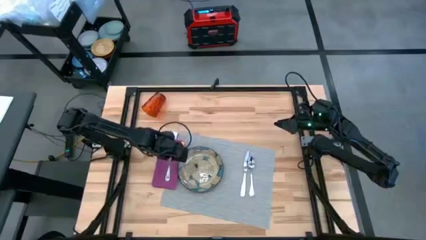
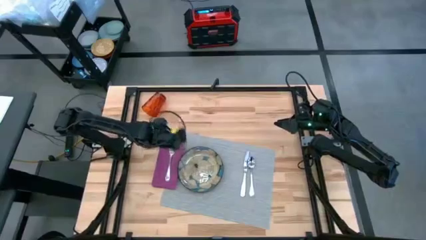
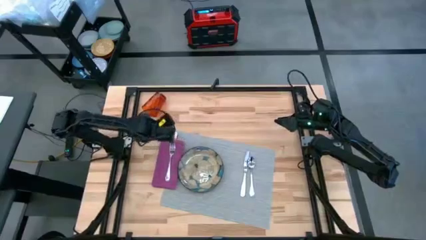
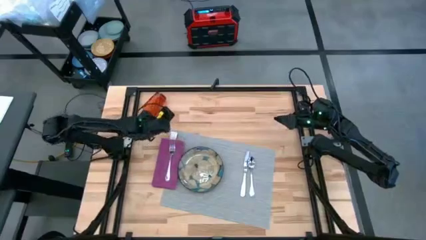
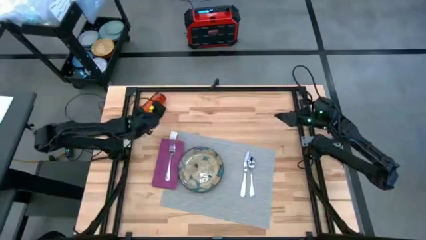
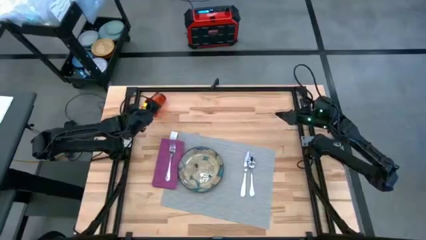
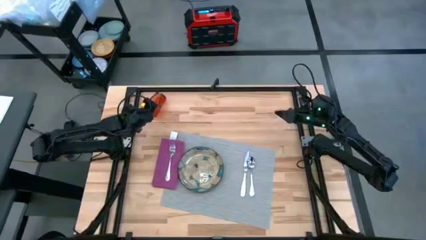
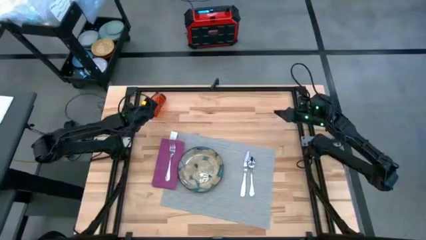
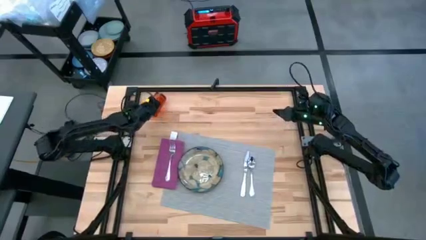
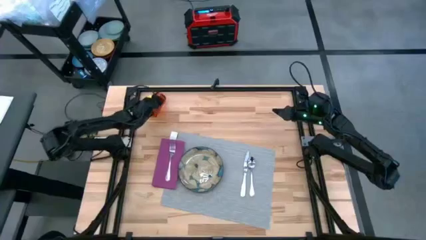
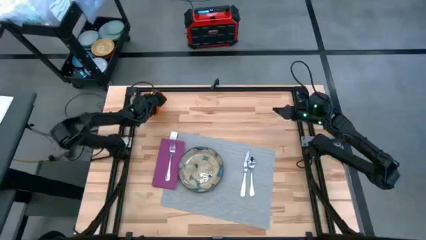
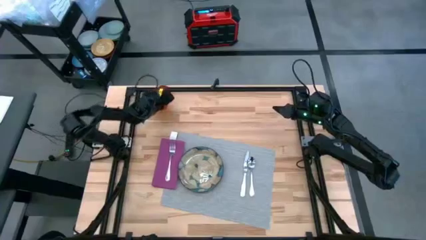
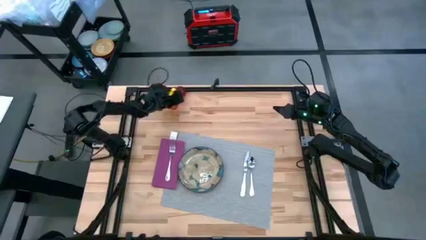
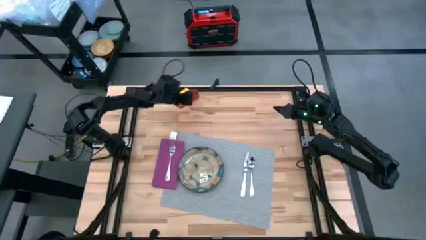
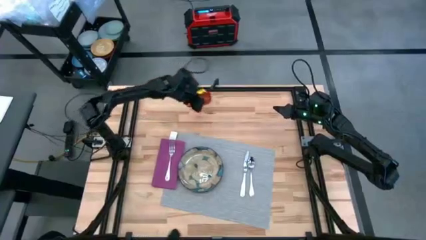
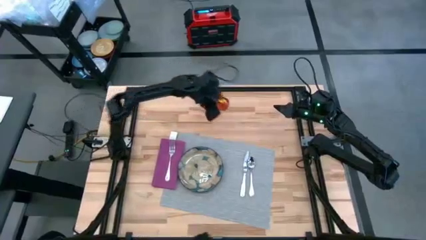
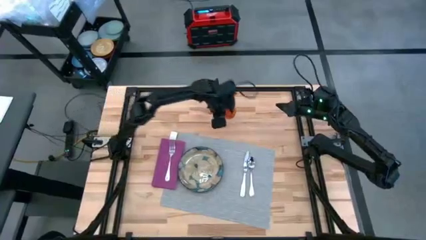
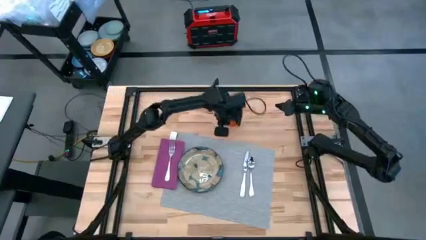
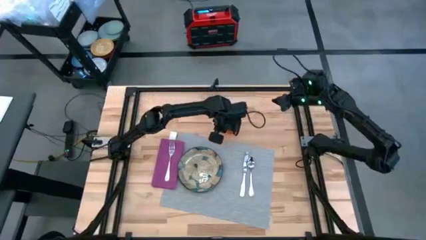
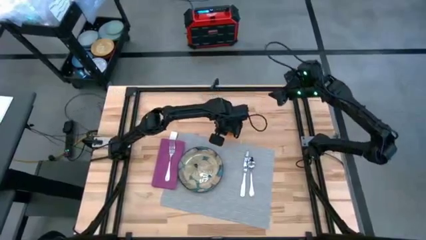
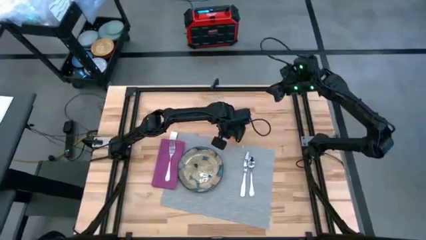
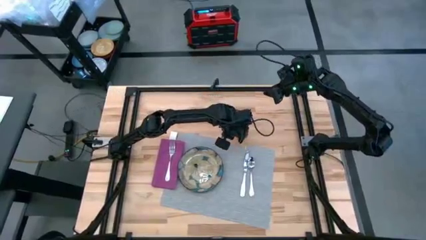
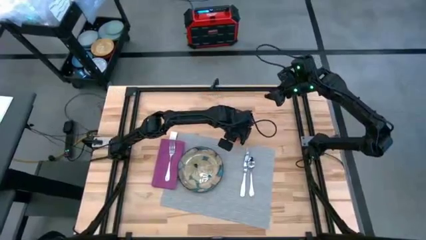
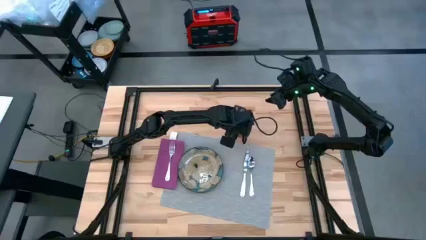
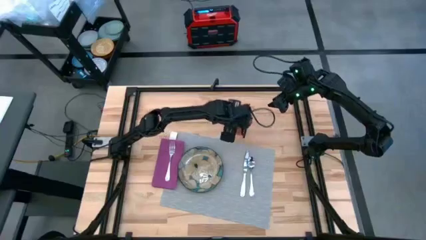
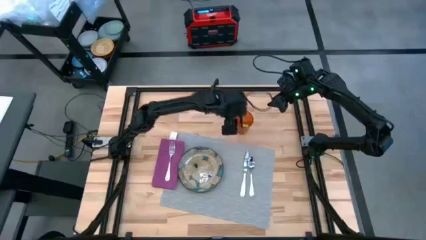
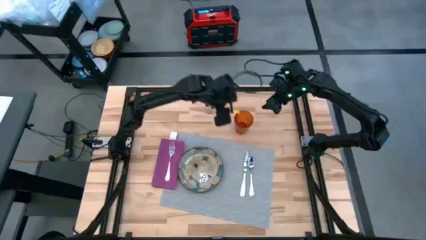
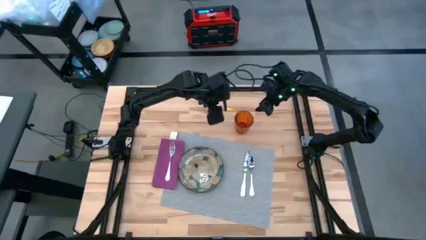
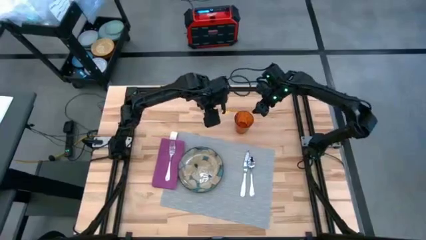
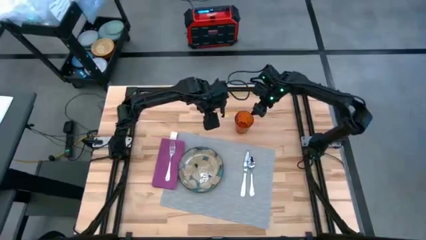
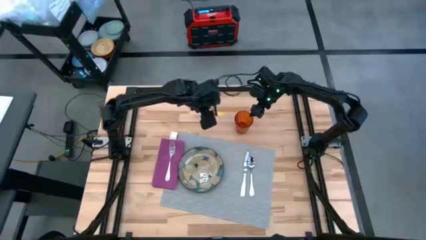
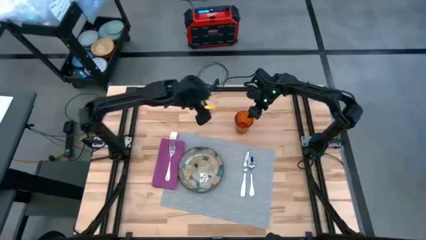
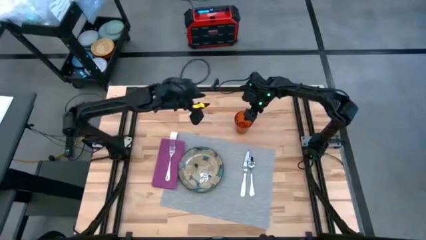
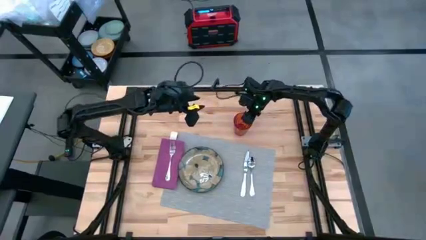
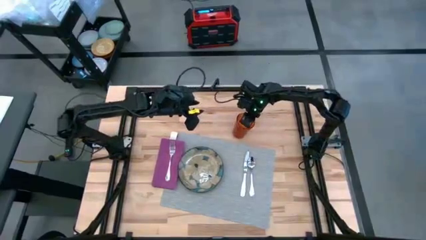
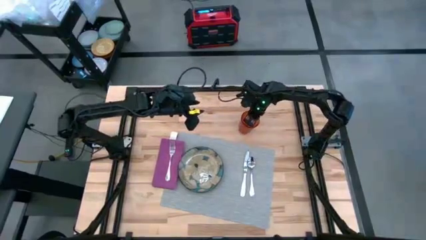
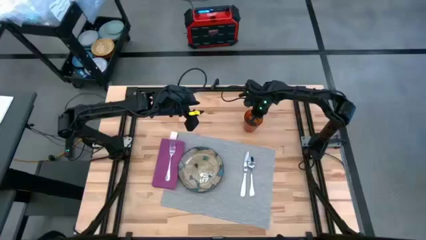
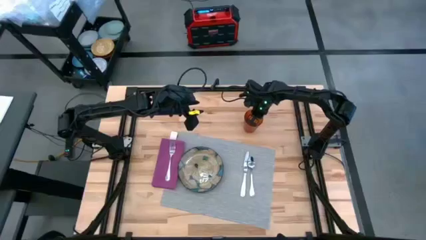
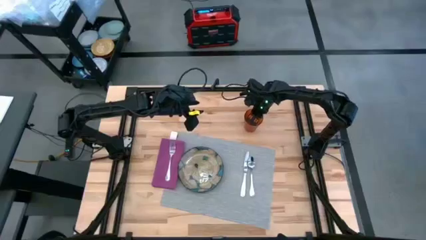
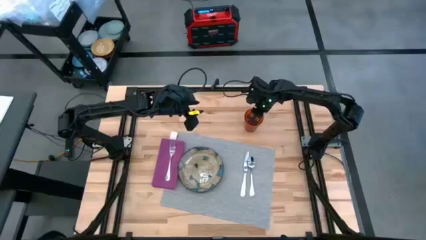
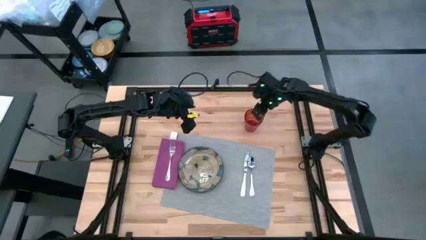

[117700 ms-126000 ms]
Task: Set table place
Put the orange cup to the top right of the gray table placemat

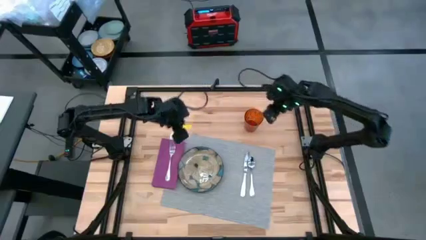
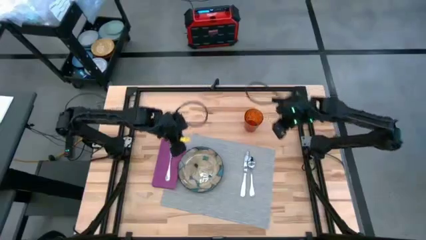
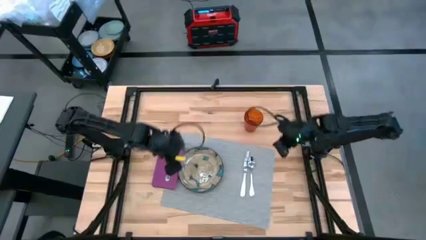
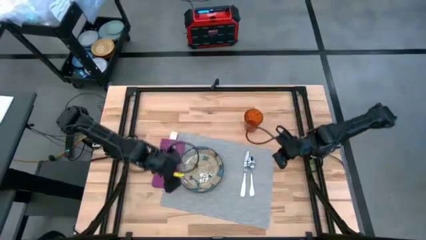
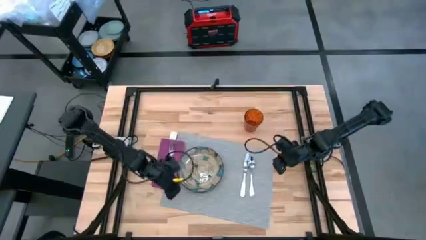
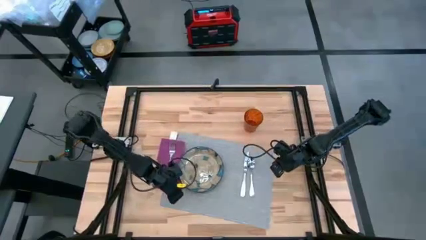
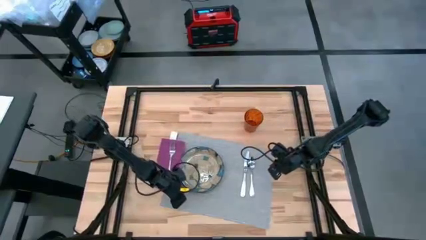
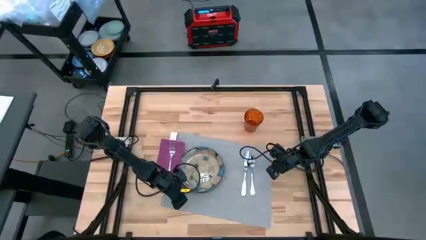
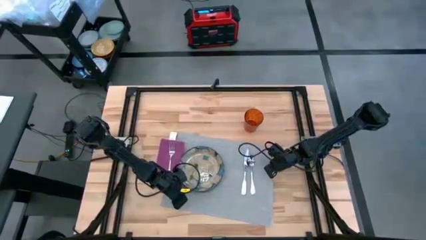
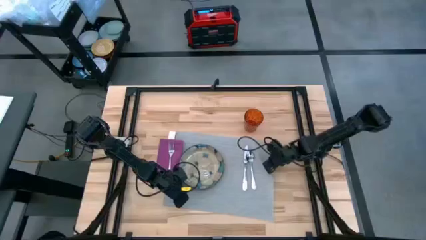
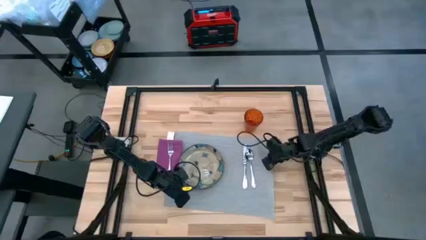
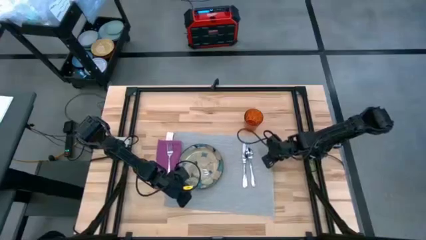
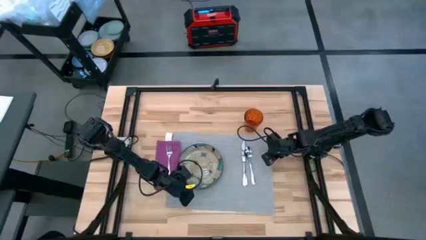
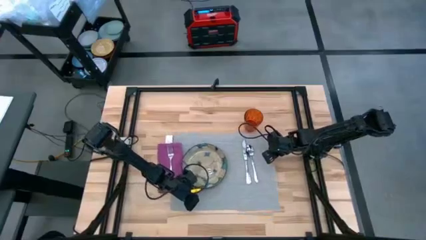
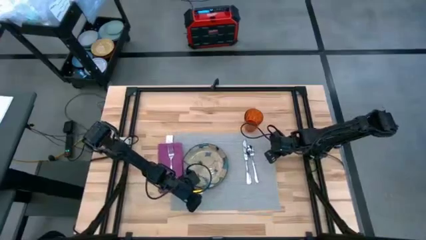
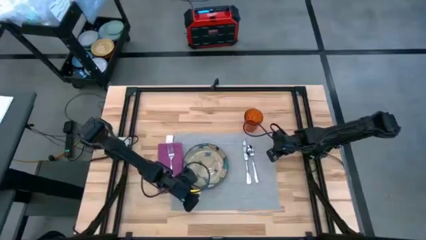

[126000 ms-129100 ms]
Adjust the gray table mat

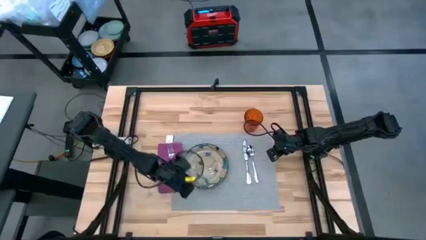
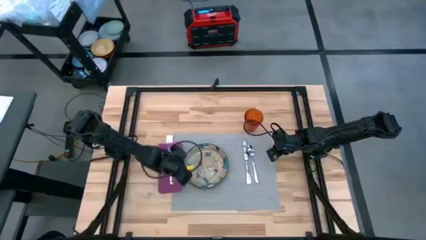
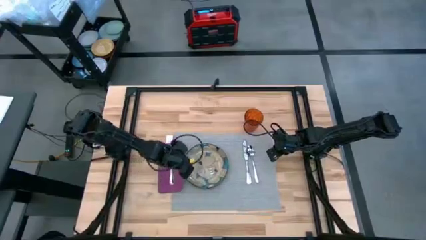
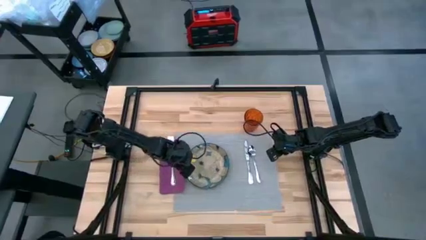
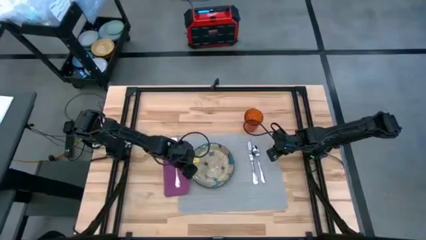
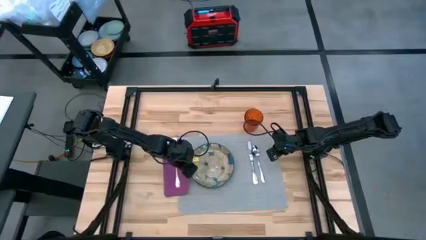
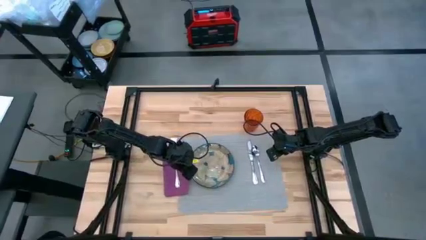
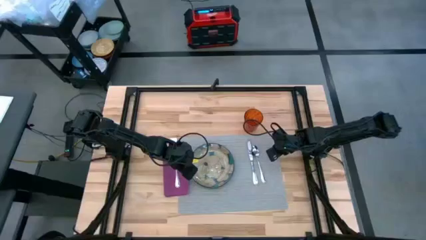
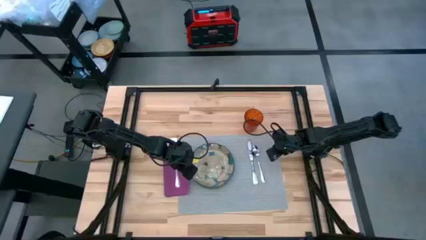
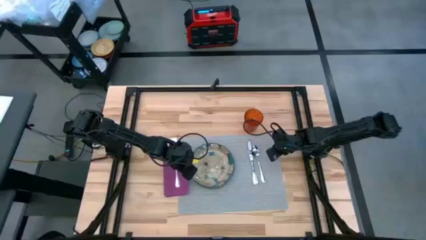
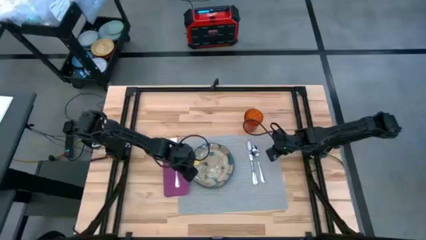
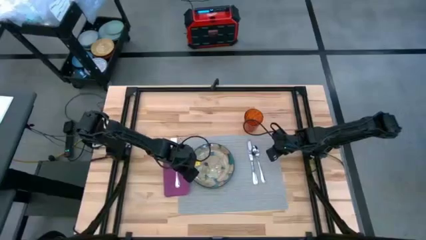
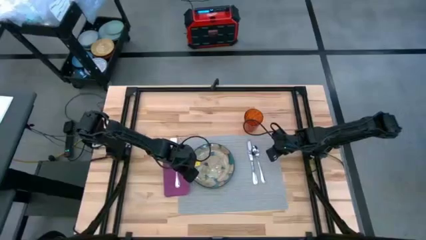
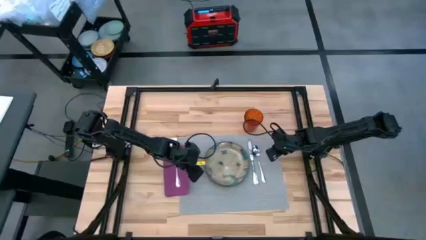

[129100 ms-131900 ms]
Adjust the patterned plate on the table mat

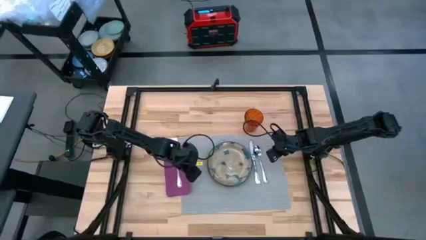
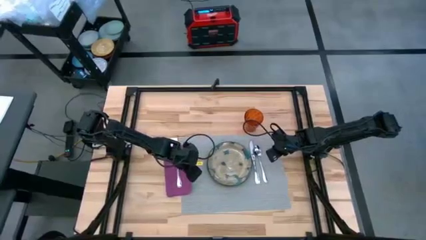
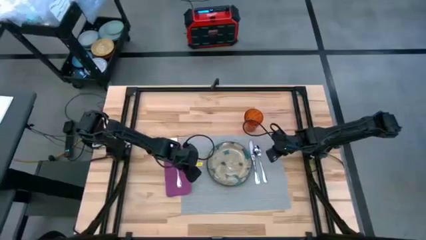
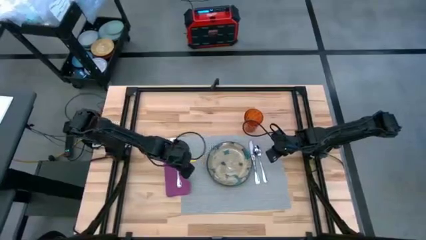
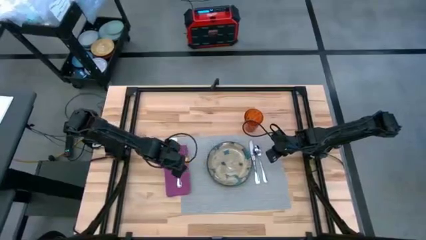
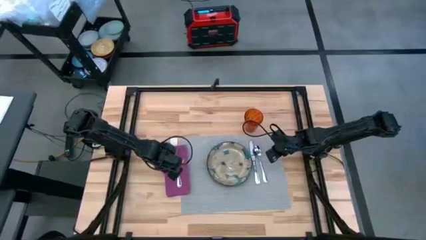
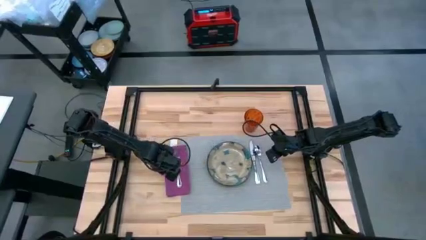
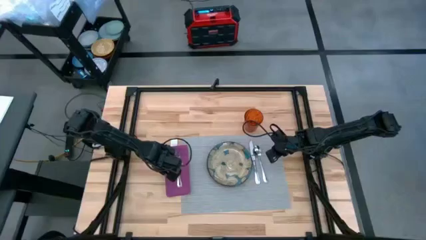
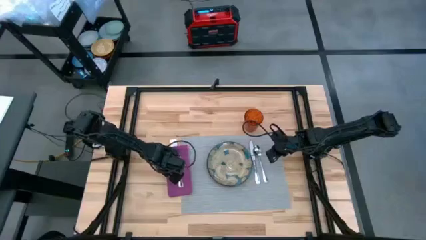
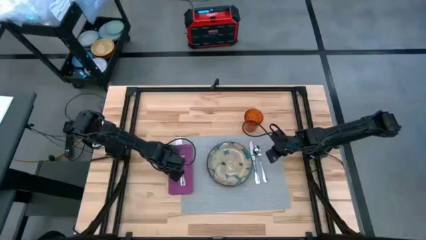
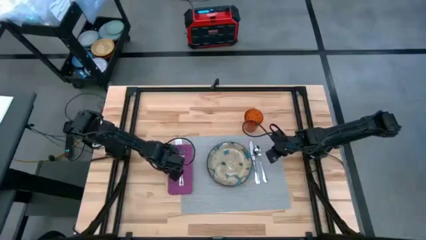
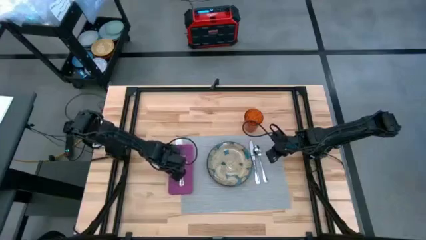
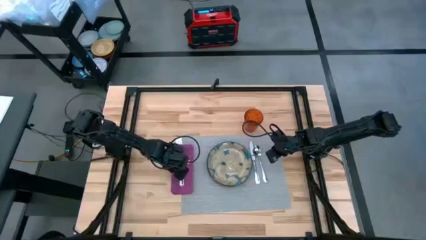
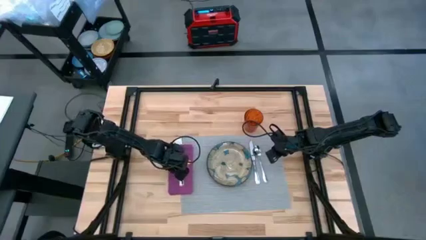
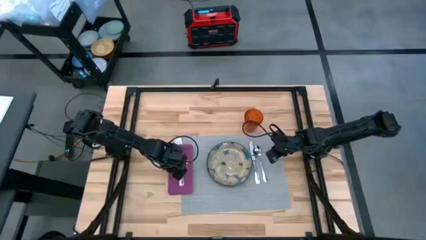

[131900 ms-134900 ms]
Adjust the pink table napkin beside the gray table mat
